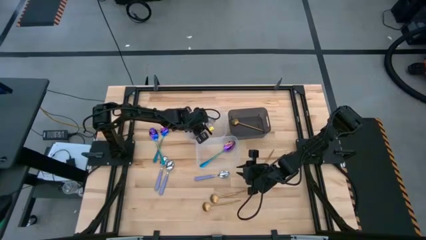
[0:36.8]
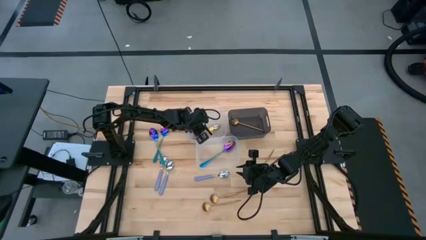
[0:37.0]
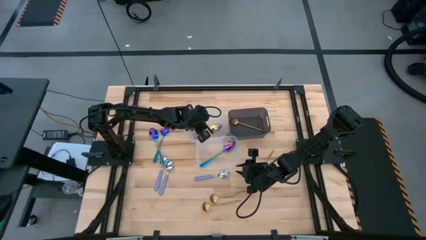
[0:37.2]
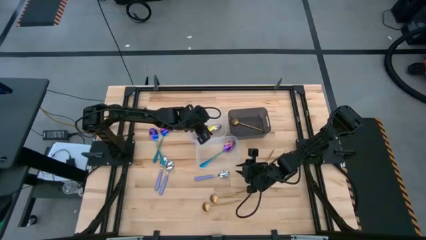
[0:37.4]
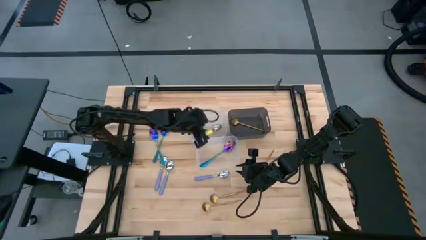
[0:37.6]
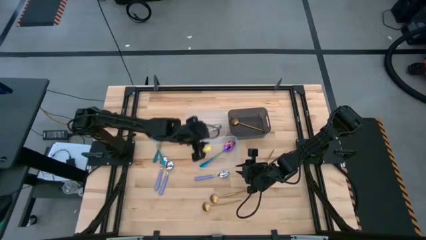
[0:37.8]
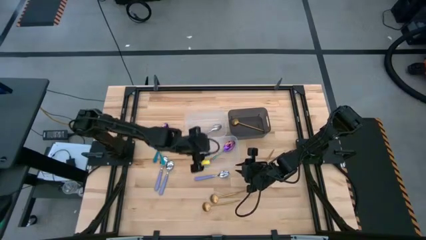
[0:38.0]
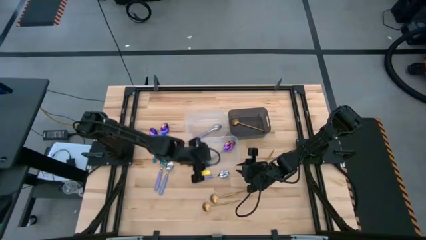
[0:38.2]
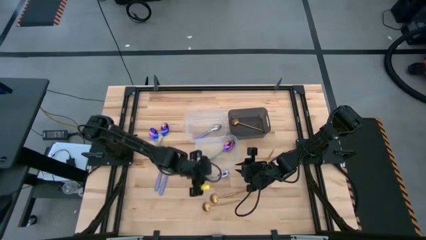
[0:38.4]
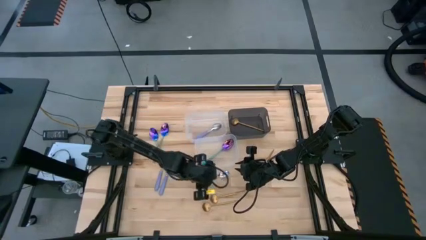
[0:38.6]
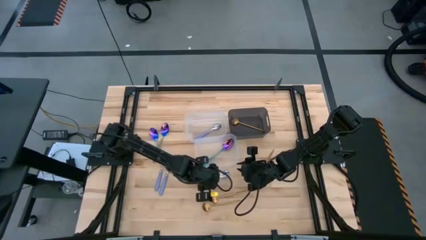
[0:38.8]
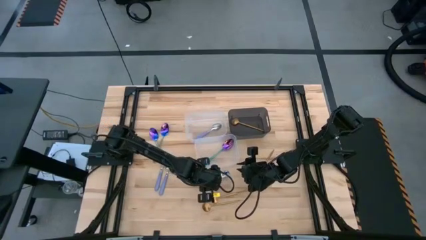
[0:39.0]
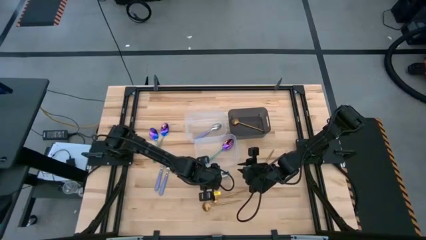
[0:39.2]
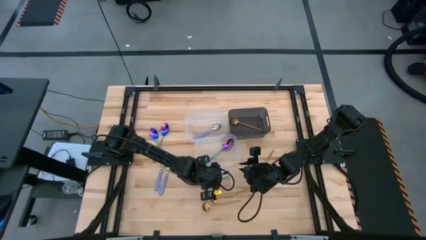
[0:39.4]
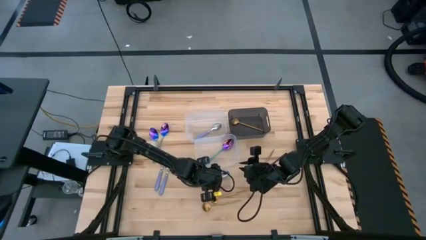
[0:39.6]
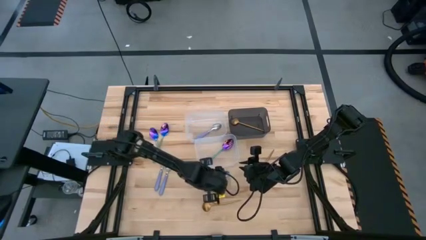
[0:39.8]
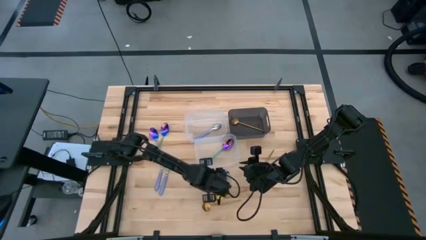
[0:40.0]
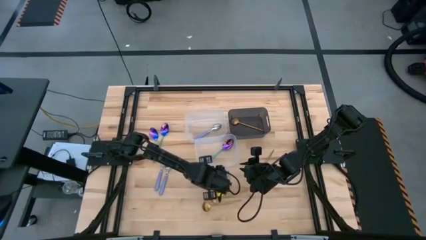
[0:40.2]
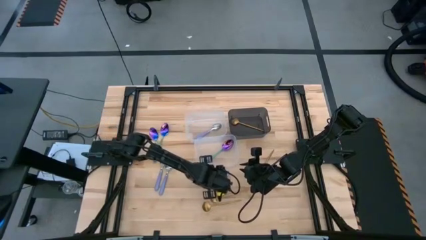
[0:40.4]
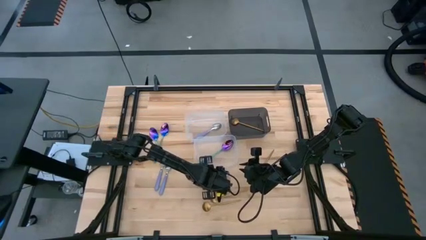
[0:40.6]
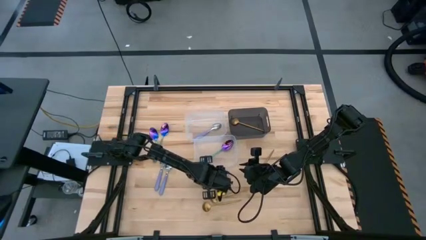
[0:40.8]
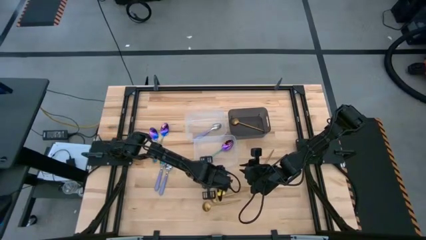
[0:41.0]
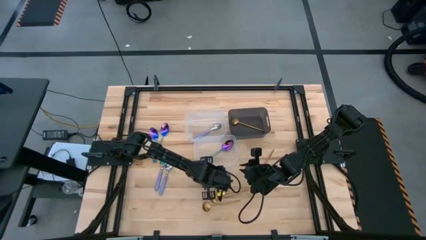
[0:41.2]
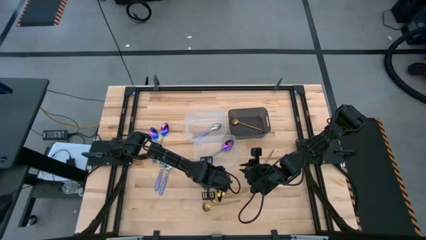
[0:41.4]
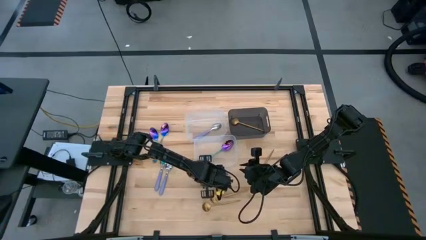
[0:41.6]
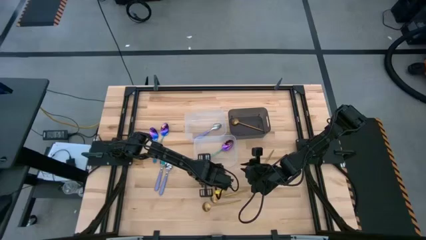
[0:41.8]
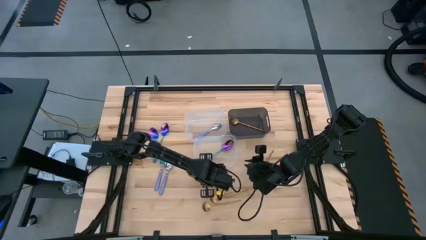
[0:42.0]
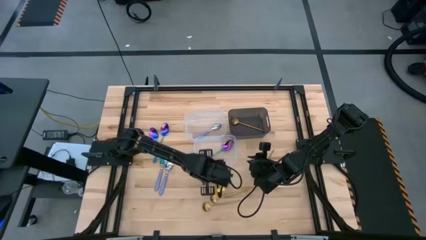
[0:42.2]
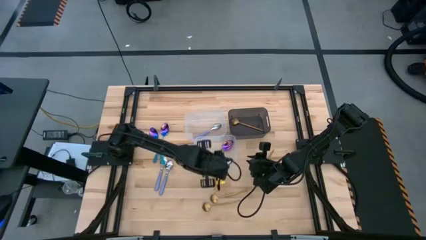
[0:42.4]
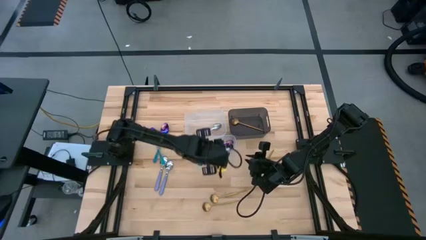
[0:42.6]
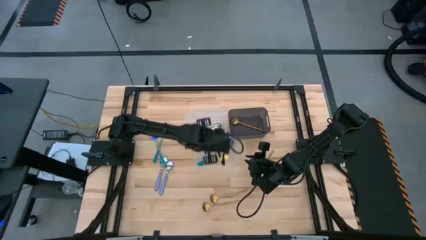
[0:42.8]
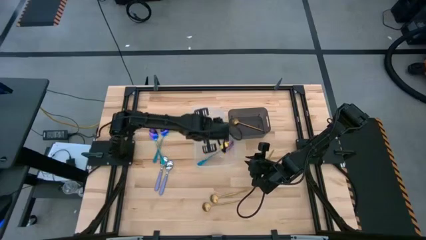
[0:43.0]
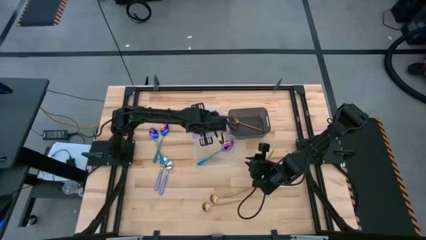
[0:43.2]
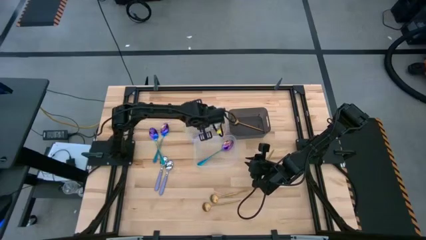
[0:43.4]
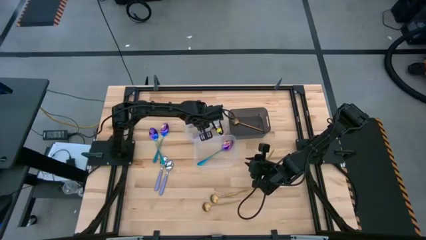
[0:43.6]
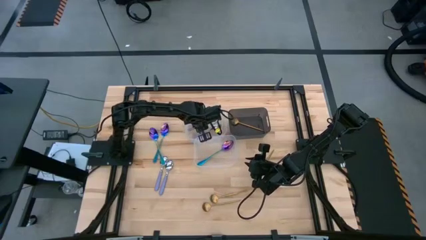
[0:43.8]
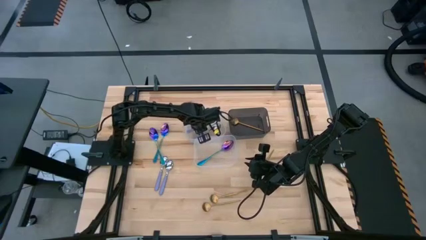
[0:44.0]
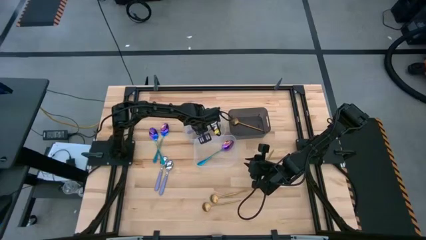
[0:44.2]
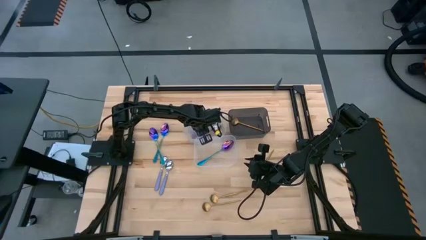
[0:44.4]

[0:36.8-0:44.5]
Task: Sort silverware by color (type)
Put the blue spoon into the top transparent bin

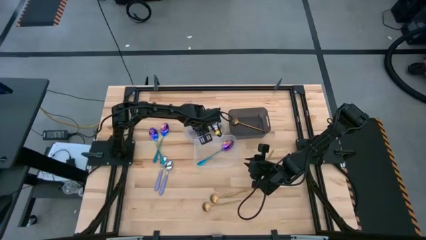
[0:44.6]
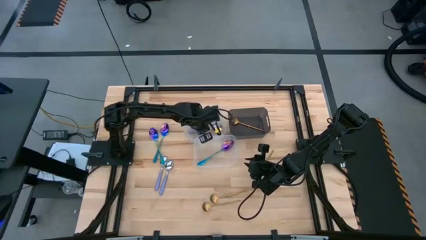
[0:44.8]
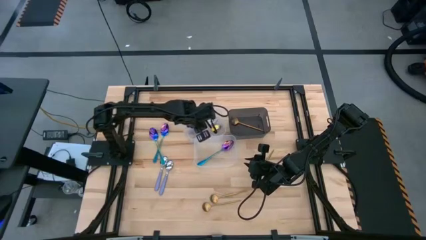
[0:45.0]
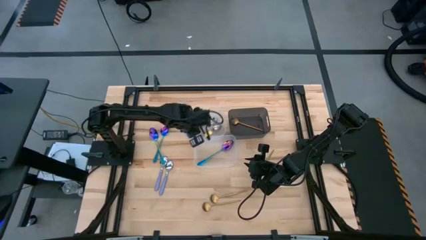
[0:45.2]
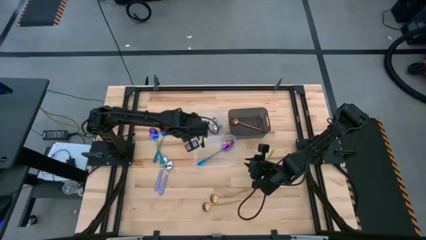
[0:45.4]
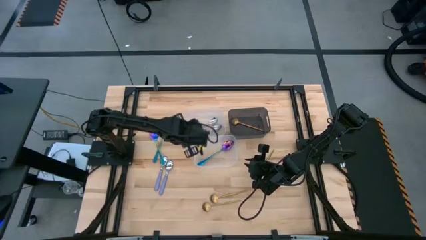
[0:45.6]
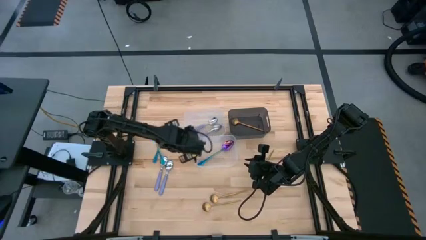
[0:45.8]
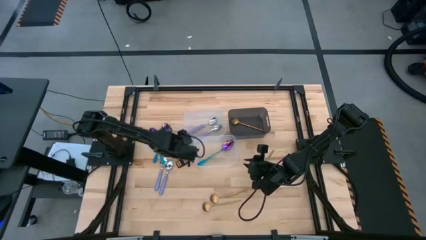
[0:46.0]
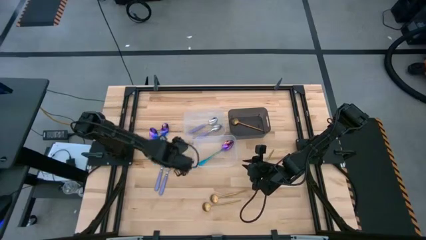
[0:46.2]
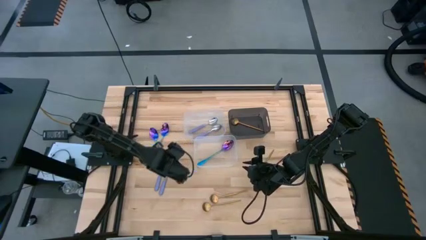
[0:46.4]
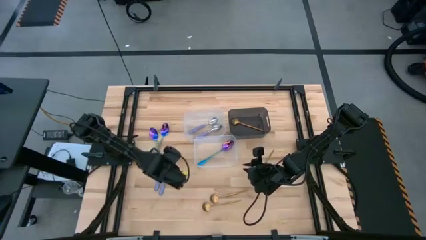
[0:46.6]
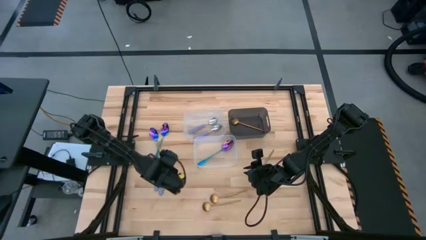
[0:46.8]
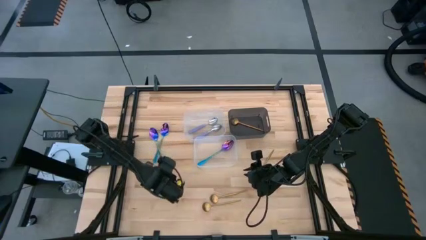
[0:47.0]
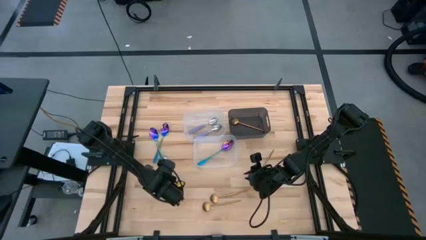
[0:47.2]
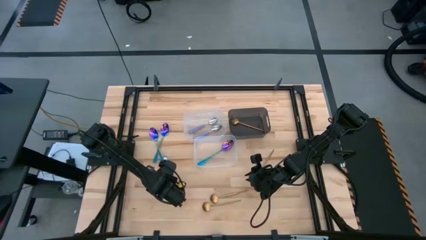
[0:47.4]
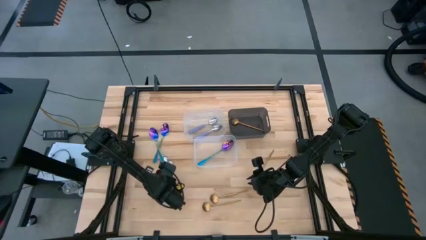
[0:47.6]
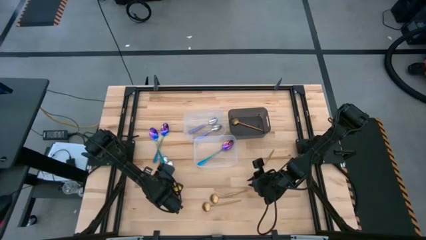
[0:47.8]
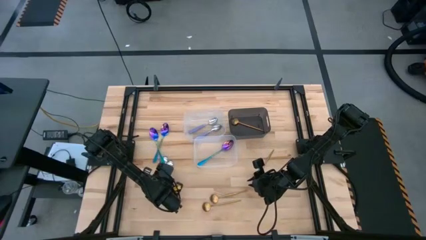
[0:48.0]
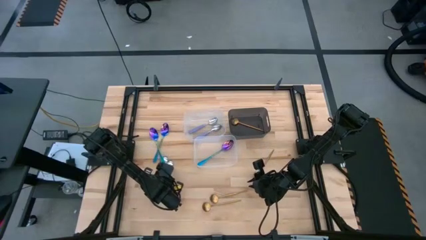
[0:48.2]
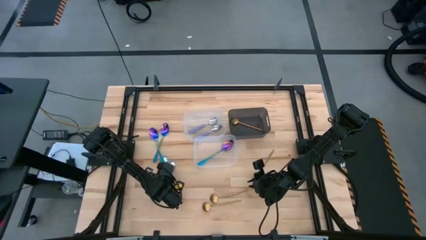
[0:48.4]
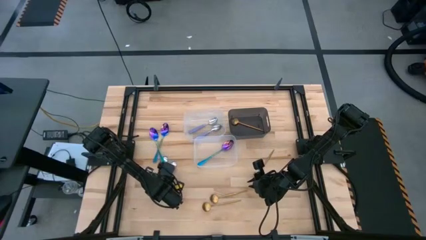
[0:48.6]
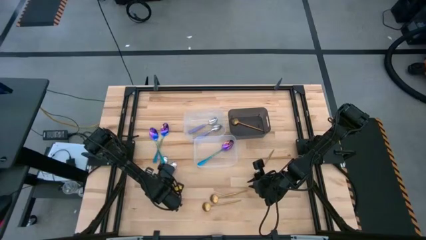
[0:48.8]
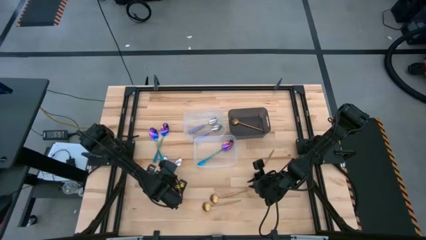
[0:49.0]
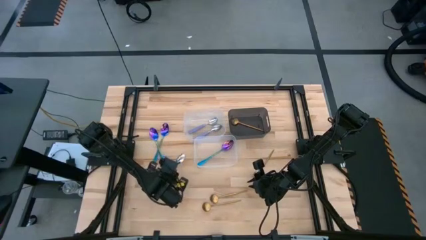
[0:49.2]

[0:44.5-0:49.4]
Put the blue spoon into the top transparent bin

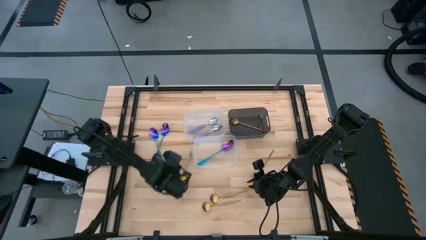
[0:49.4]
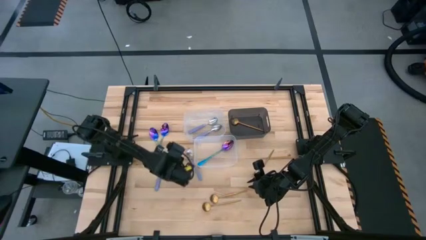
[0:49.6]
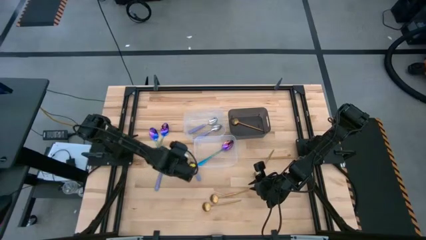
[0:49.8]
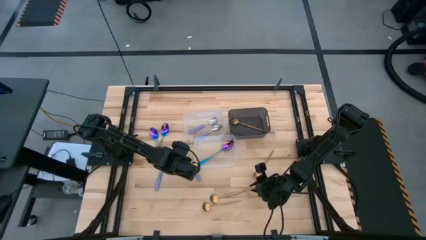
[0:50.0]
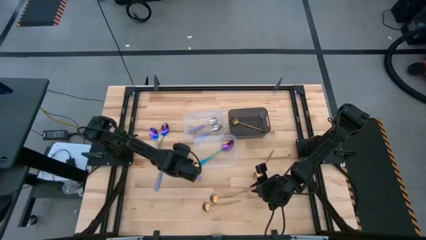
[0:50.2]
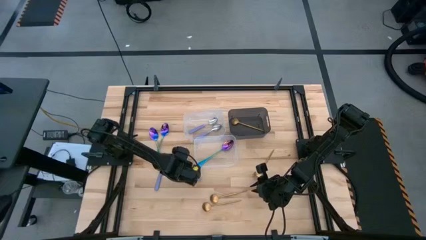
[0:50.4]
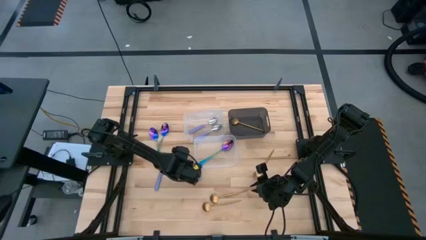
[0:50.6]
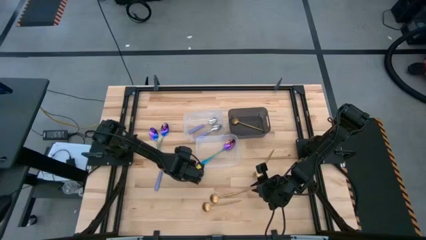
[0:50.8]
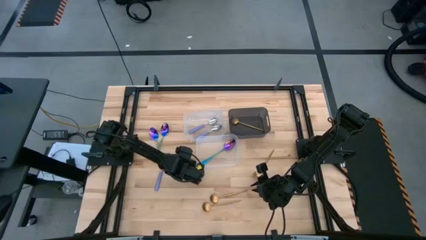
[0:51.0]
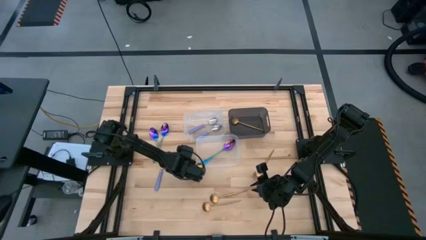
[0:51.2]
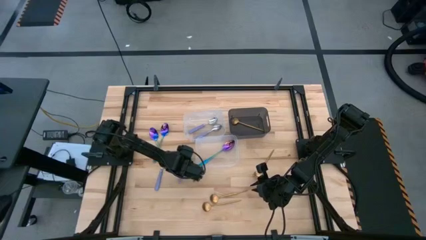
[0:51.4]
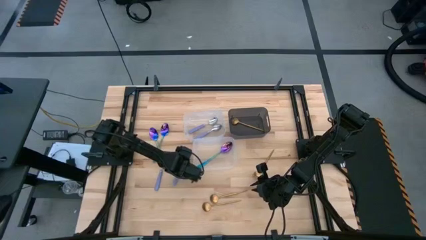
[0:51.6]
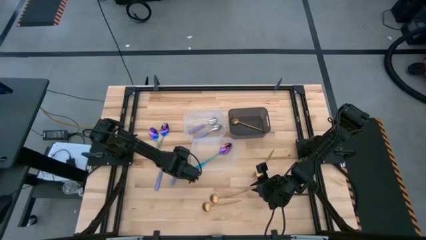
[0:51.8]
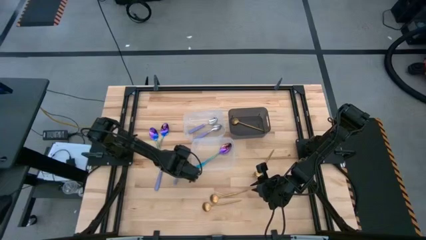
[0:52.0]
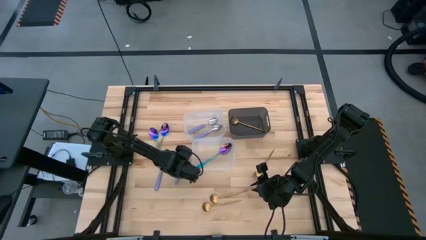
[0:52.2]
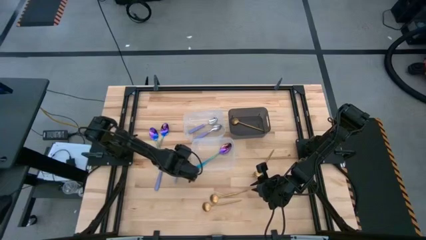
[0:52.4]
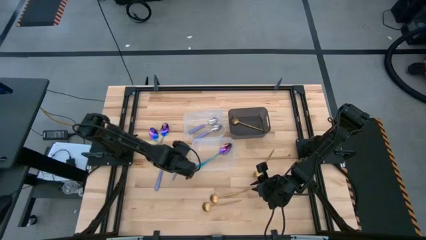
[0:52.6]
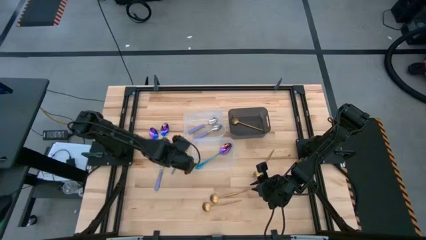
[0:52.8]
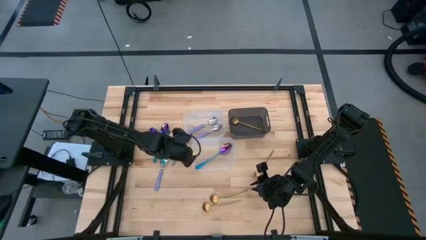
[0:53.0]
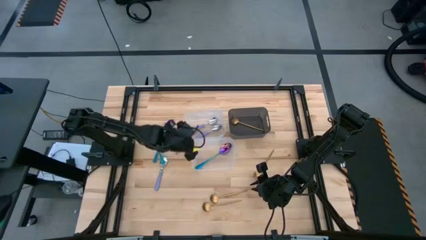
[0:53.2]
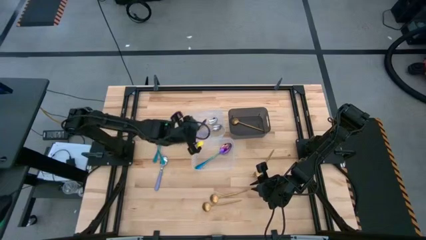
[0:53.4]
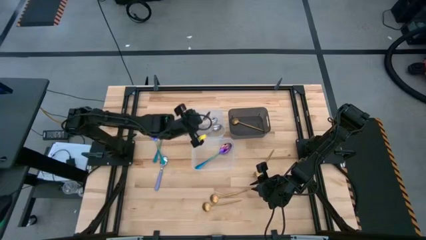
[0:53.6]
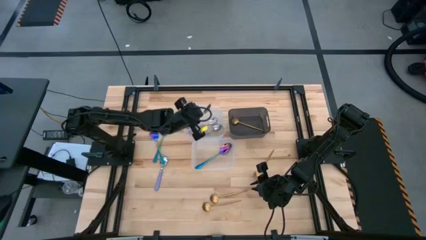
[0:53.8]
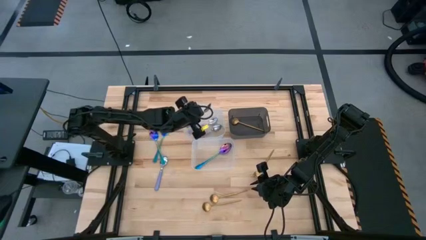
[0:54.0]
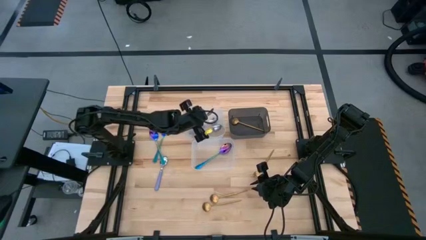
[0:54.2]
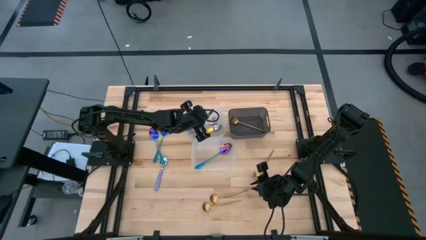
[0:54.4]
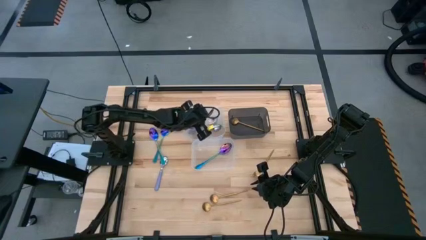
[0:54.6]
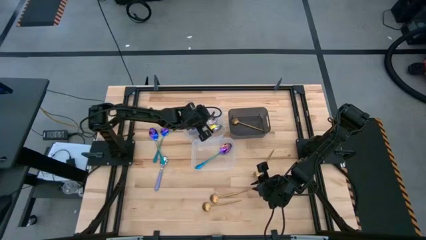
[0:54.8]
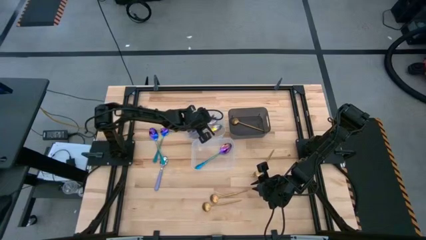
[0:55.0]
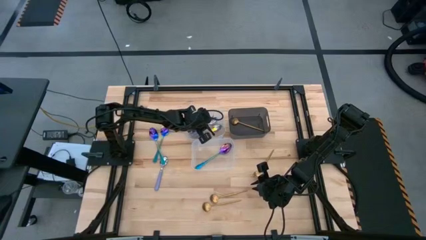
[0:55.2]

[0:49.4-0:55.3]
Put the blue spoon into the top transparent bin
